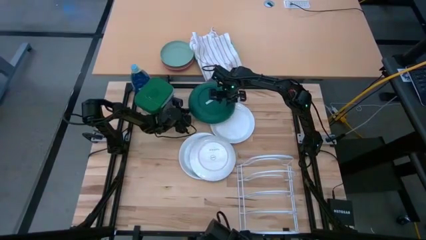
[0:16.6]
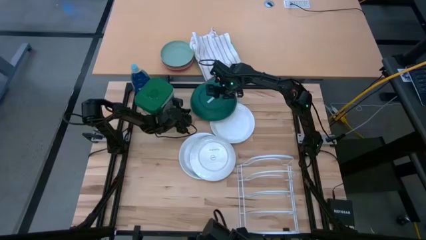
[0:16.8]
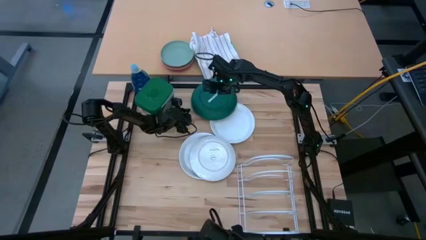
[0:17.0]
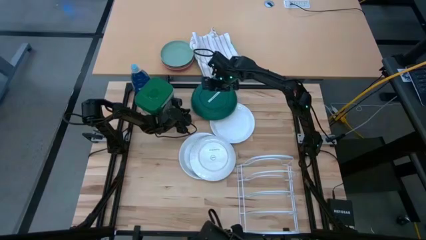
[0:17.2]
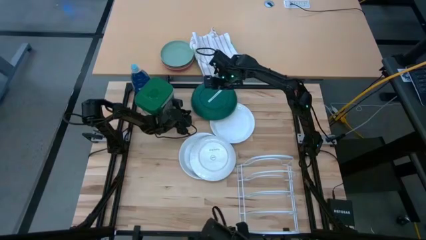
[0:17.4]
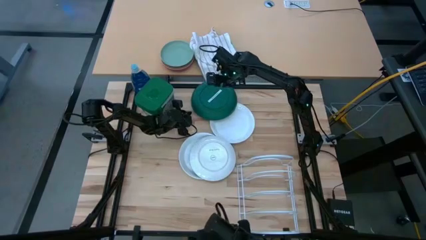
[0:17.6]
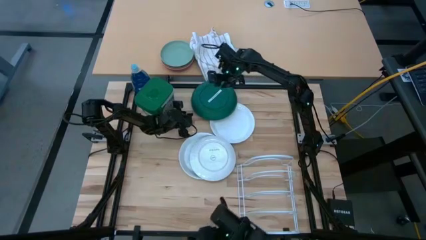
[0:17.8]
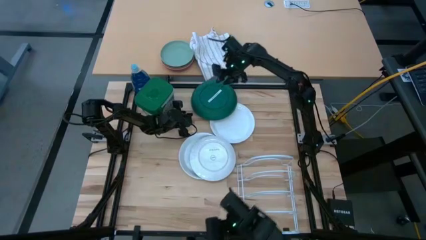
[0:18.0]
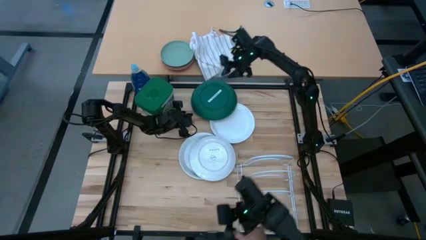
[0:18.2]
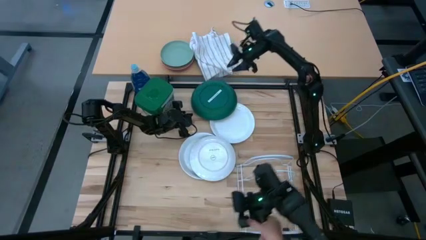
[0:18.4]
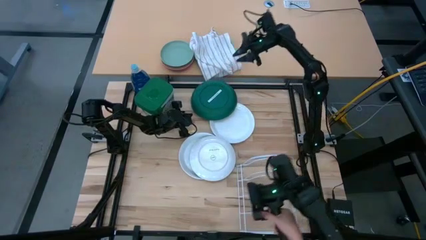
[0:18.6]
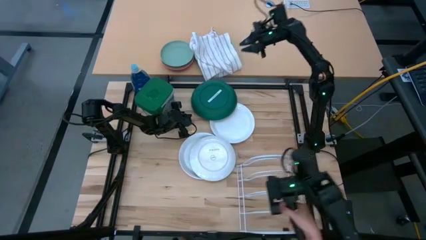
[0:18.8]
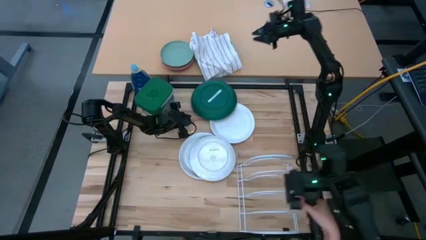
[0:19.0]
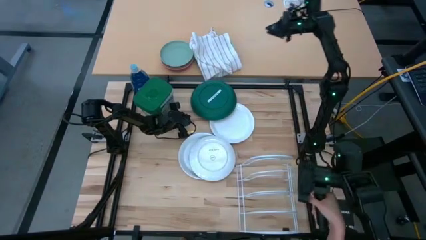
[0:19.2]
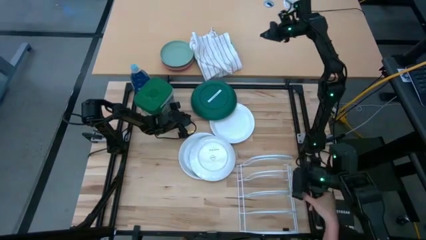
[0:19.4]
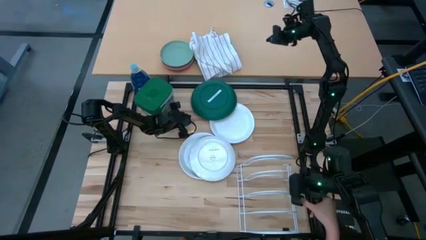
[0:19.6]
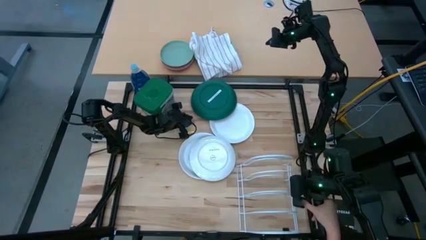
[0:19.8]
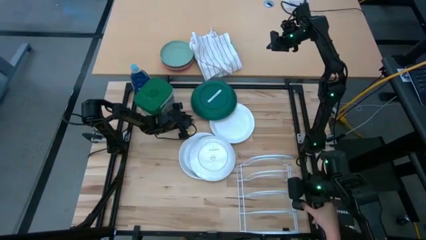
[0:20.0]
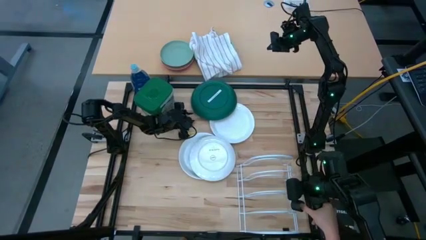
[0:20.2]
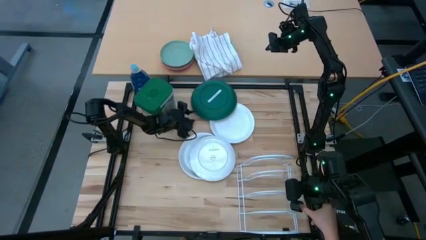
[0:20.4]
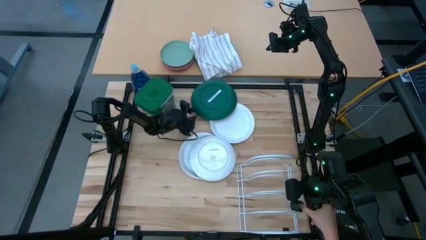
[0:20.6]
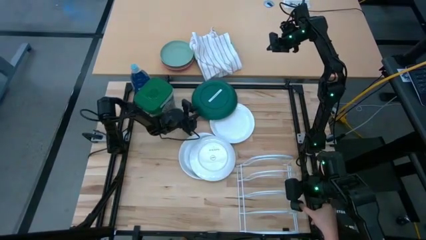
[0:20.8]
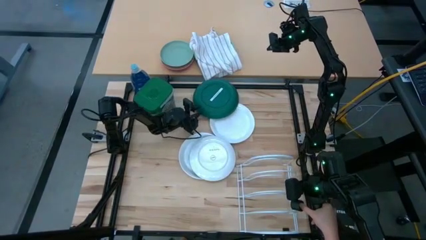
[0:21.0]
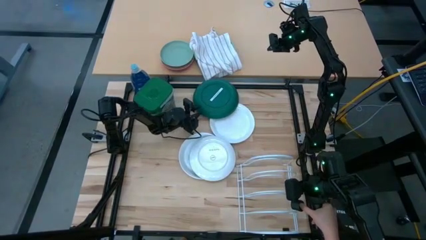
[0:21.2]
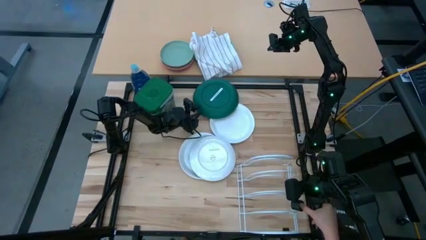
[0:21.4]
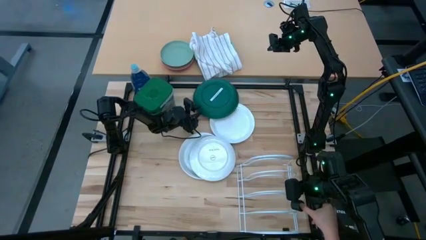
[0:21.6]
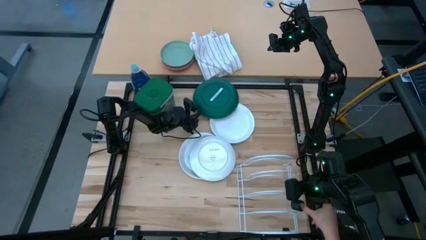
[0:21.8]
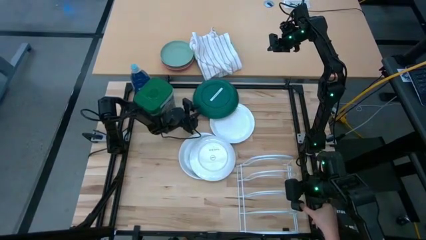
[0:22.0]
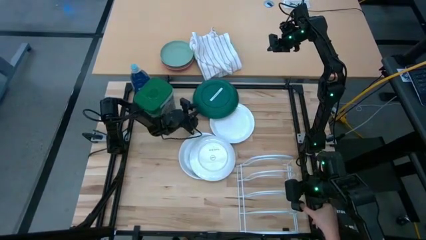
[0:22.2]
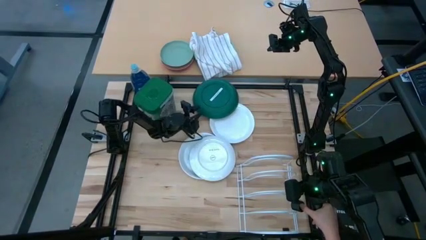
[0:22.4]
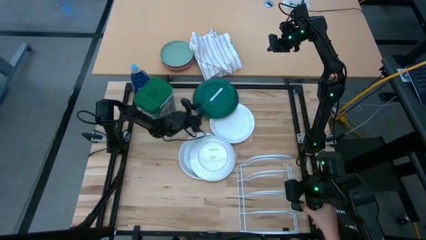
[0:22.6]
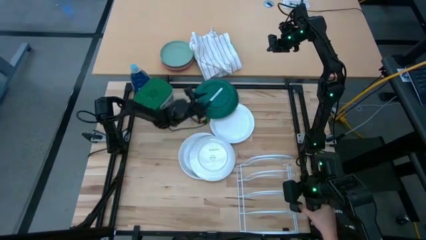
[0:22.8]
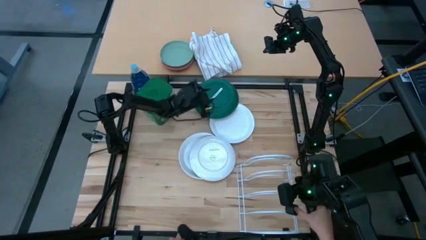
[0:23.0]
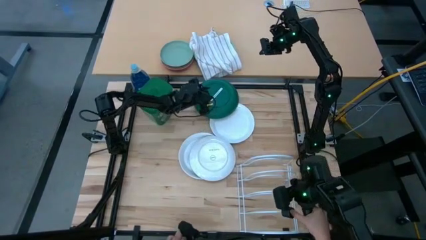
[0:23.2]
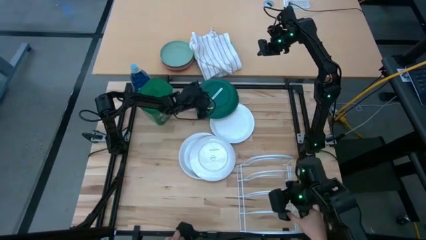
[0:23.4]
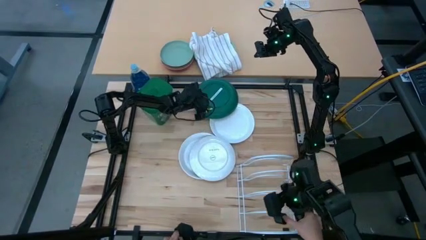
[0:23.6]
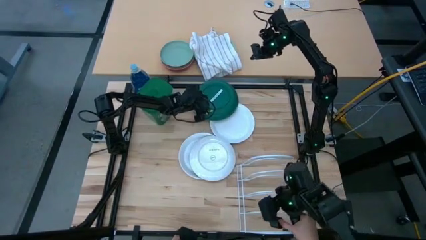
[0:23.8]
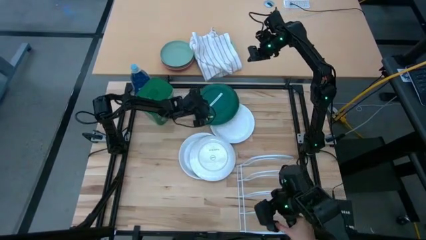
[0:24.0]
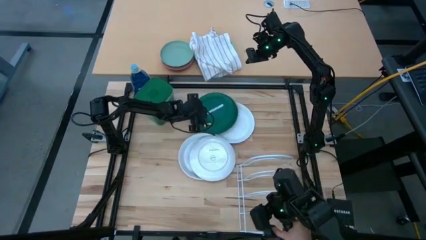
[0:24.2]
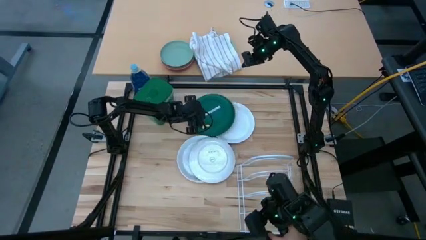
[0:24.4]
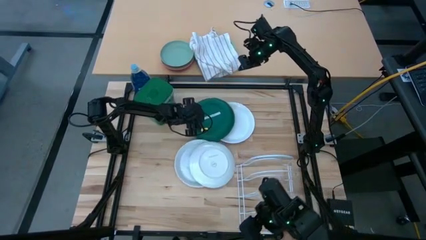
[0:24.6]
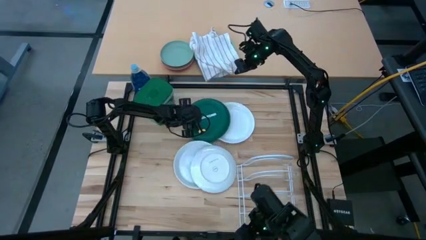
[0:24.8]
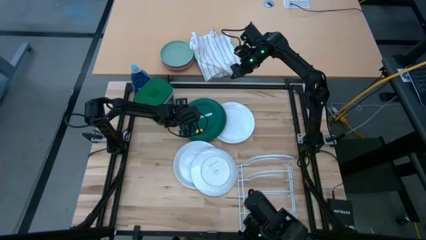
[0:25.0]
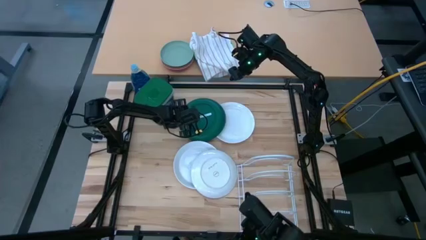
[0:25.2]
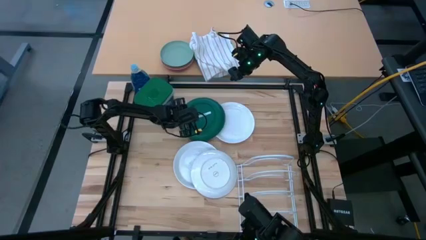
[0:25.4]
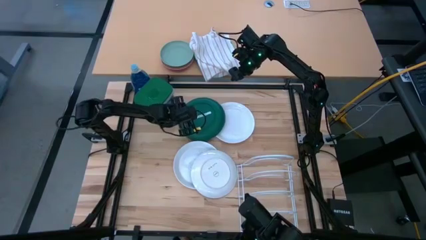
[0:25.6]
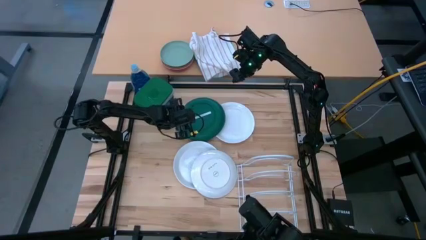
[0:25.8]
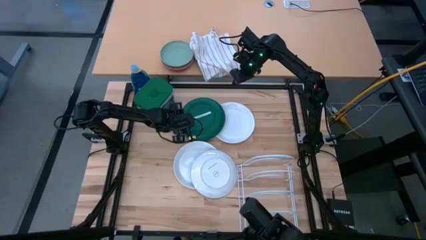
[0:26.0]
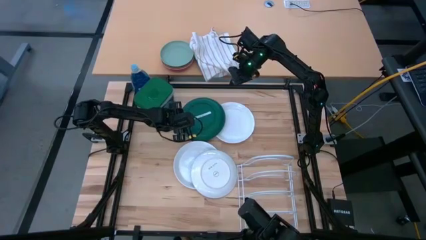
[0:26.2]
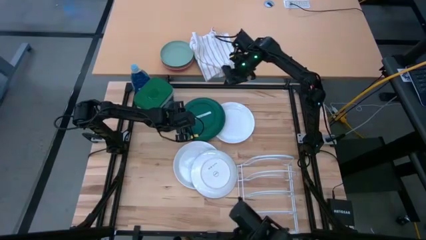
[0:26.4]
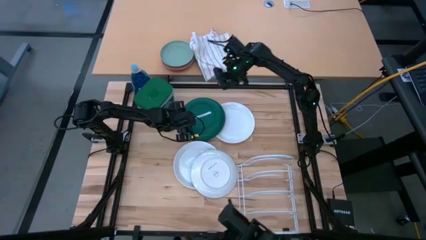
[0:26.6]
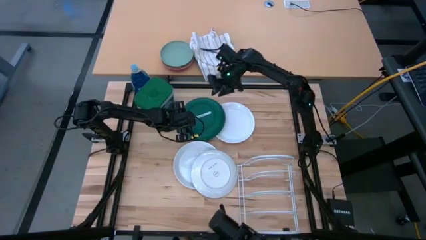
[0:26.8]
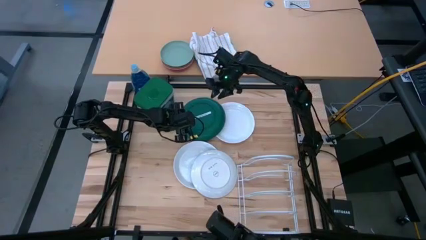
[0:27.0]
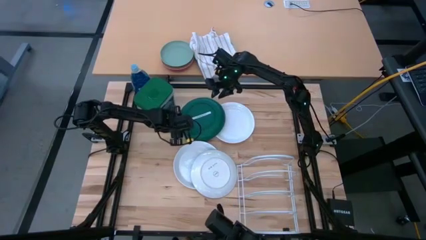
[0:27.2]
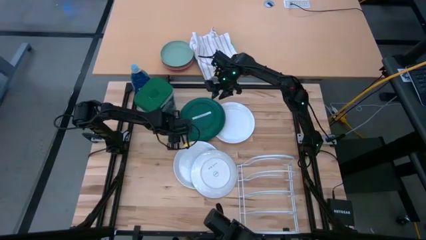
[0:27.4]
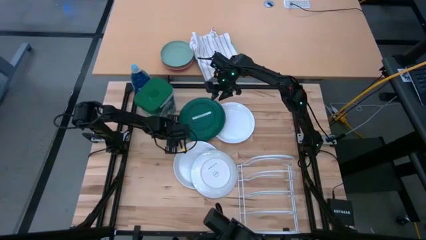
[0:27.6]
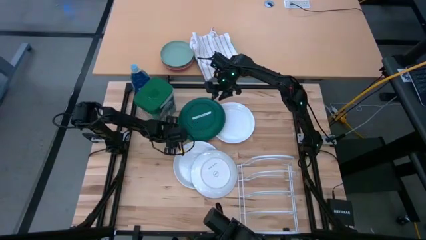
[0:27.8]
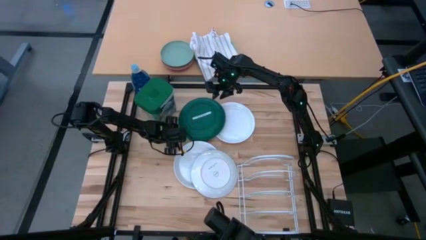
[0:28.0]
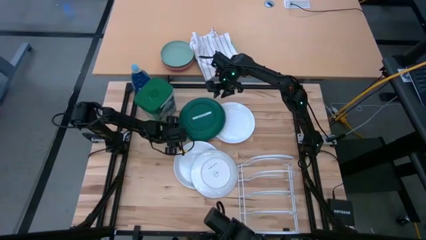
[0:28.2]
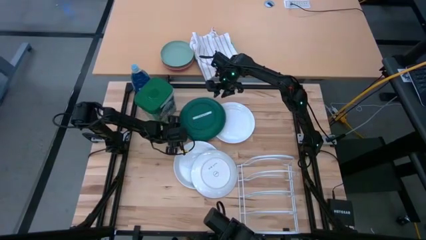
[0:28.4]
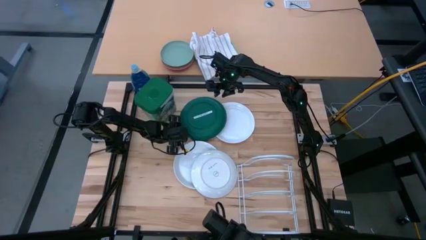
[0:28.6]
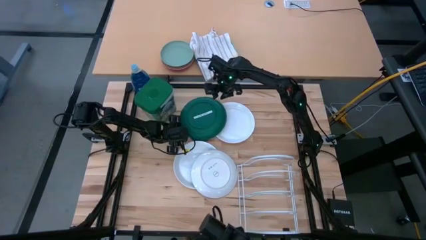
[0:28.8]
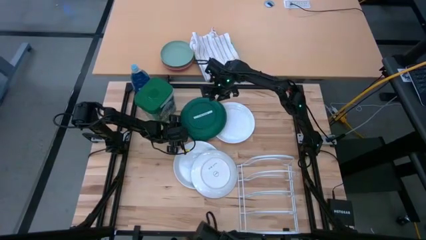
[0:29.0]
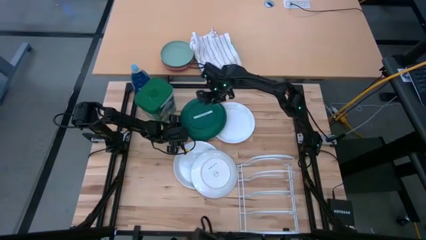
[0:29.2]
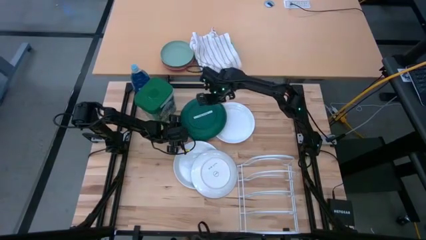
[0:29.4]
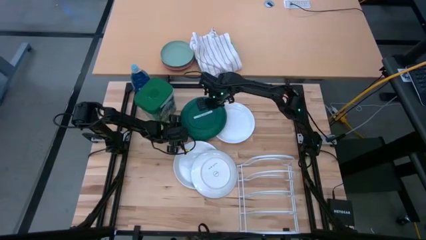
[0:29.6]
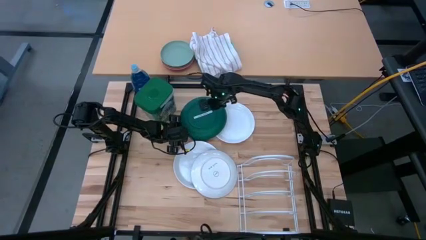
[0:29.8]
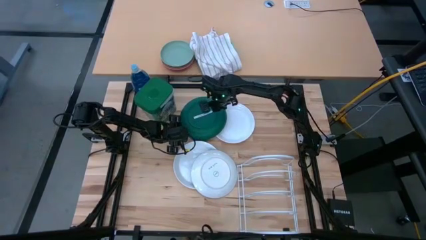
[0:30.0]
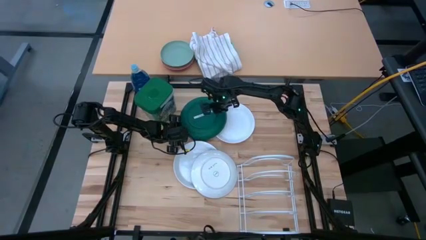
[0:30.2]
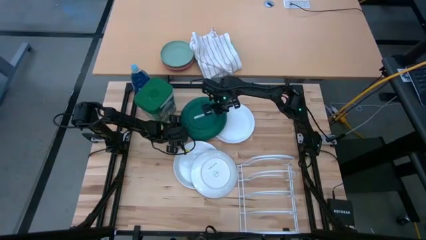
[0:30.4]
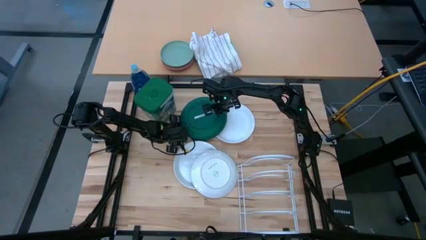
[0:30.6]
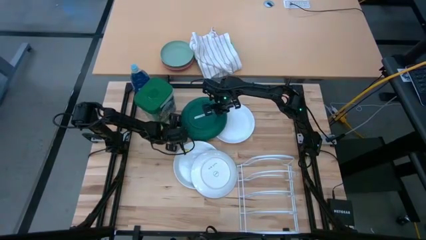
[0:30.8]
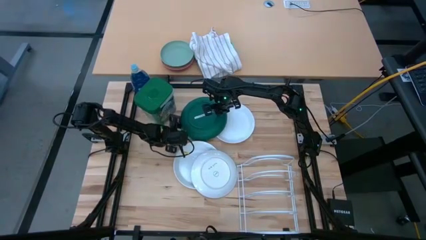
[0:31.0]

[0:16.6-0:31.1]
Task: Sort dishes
Put the green plate on the dish rack
